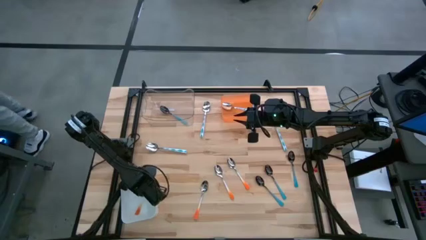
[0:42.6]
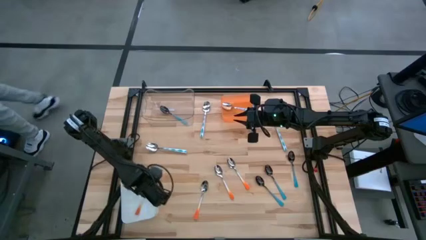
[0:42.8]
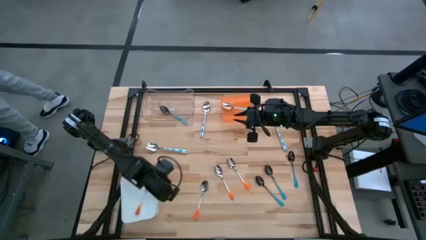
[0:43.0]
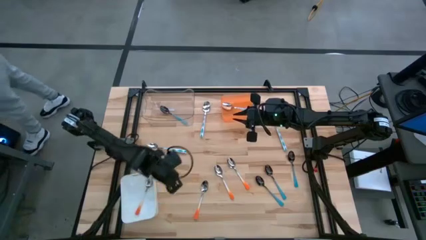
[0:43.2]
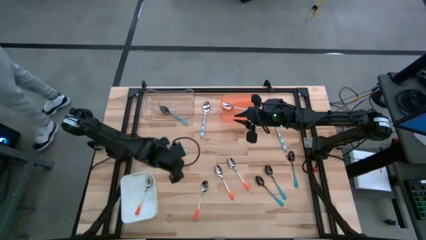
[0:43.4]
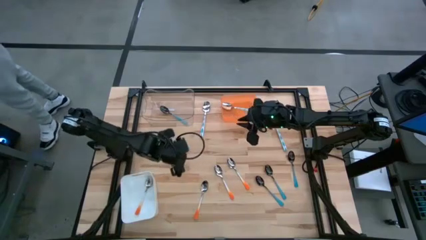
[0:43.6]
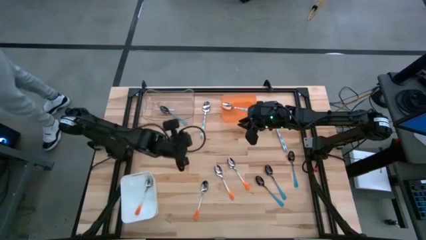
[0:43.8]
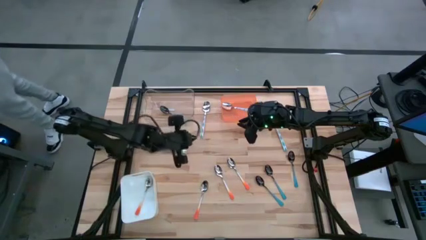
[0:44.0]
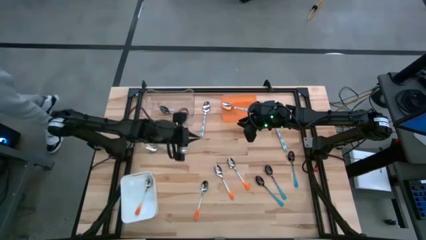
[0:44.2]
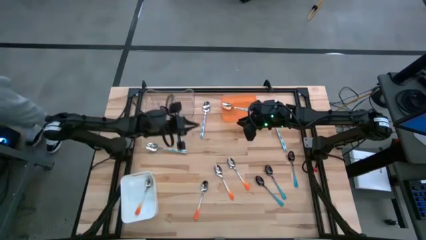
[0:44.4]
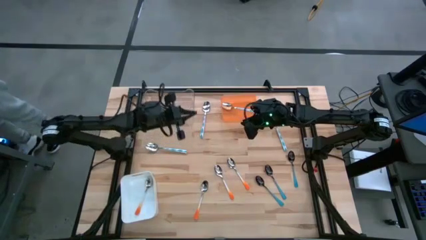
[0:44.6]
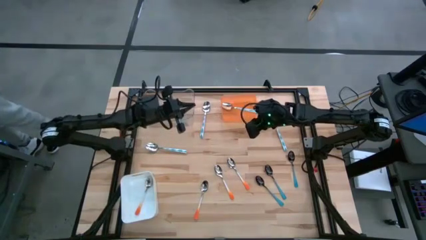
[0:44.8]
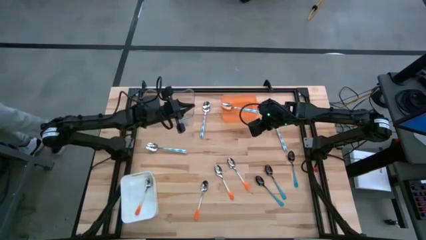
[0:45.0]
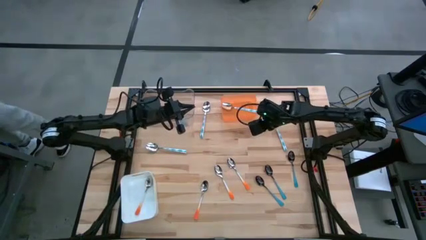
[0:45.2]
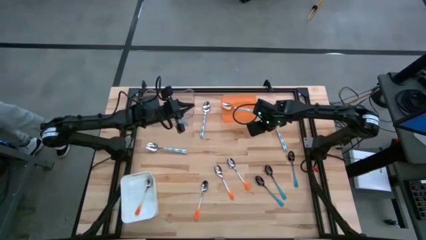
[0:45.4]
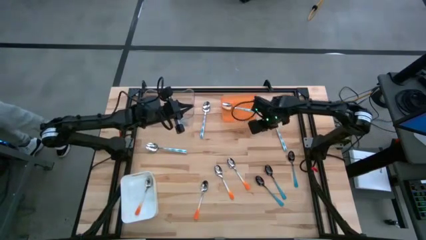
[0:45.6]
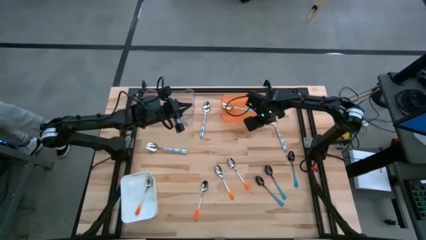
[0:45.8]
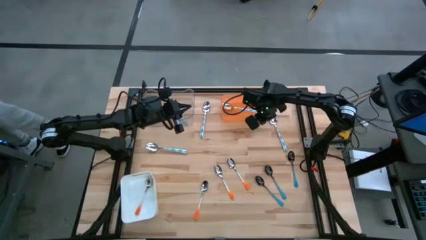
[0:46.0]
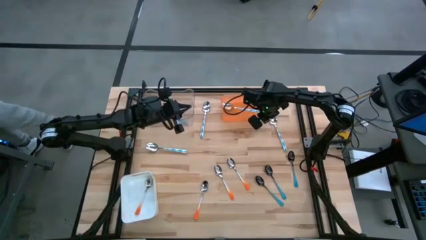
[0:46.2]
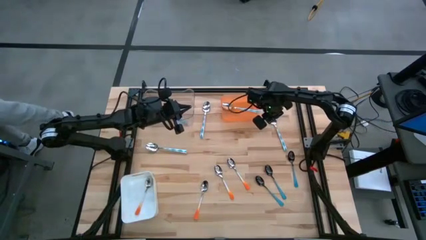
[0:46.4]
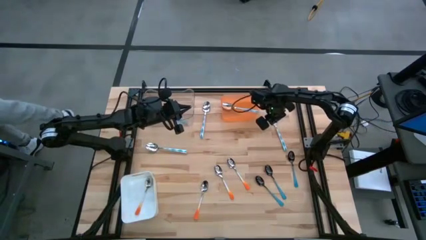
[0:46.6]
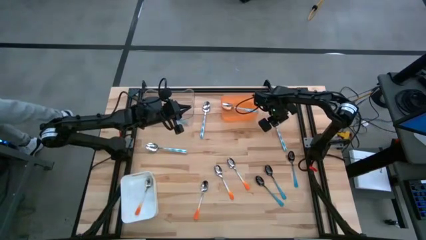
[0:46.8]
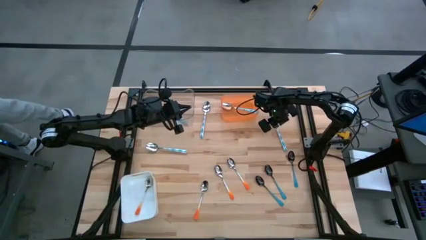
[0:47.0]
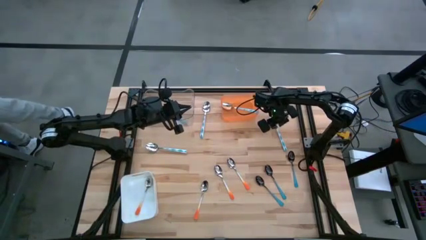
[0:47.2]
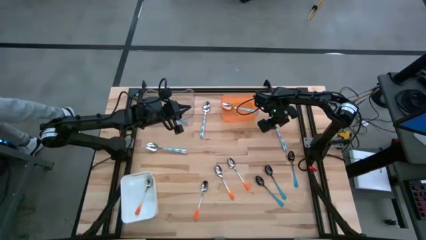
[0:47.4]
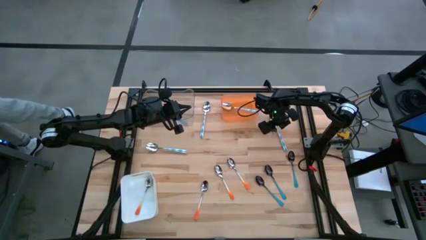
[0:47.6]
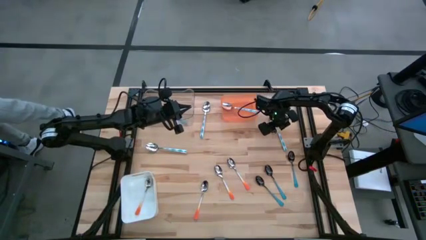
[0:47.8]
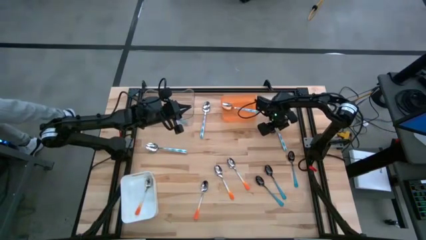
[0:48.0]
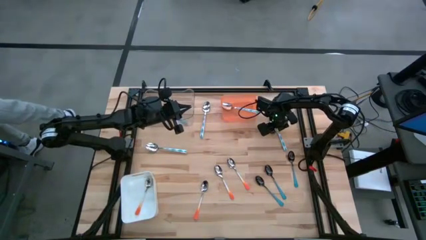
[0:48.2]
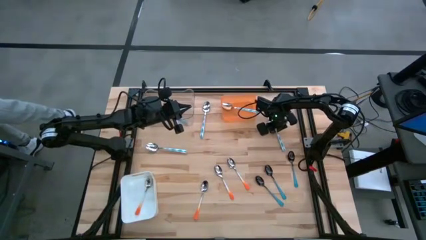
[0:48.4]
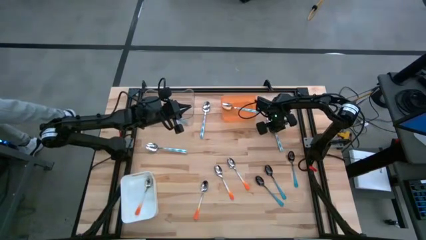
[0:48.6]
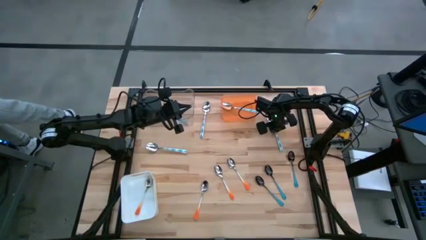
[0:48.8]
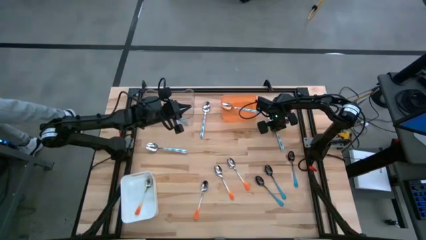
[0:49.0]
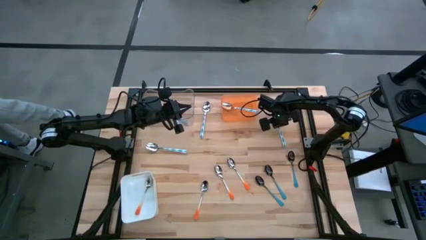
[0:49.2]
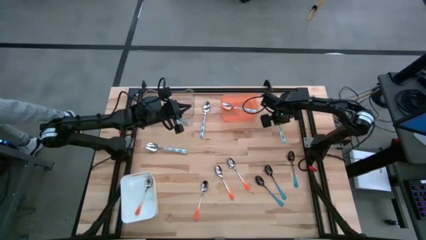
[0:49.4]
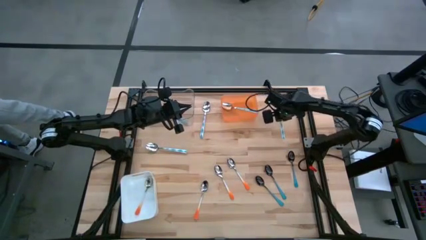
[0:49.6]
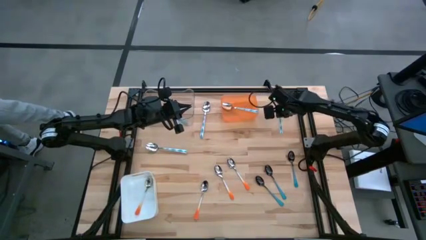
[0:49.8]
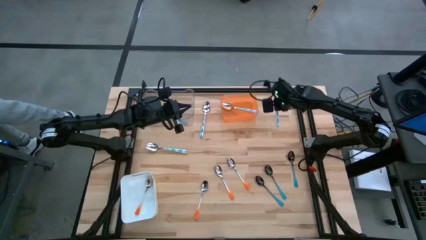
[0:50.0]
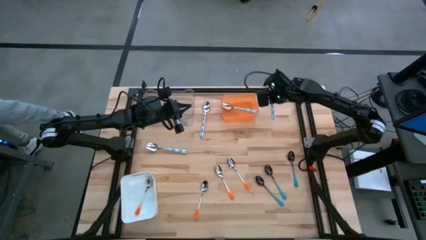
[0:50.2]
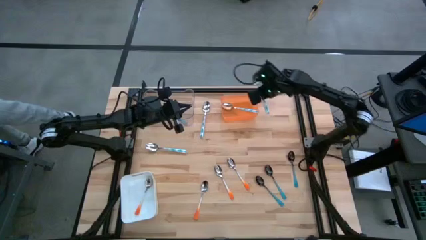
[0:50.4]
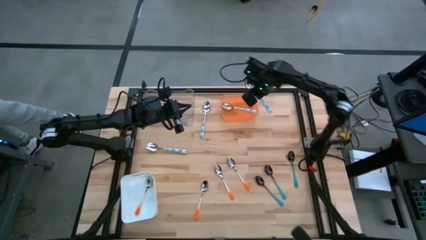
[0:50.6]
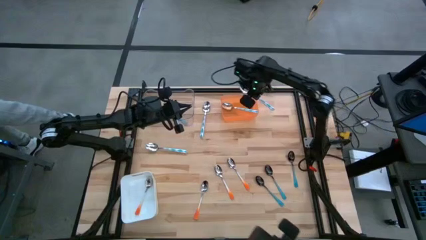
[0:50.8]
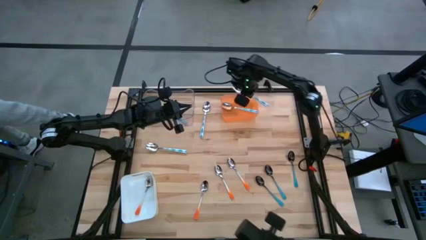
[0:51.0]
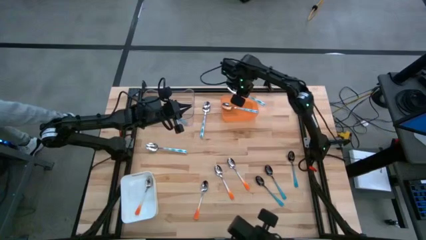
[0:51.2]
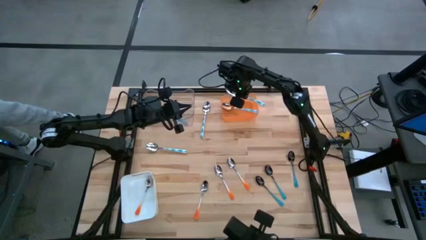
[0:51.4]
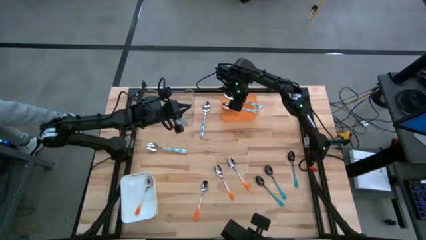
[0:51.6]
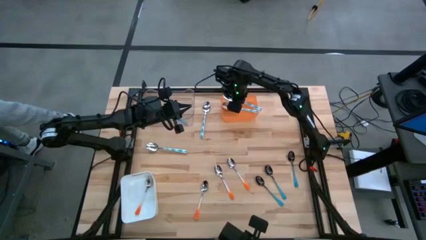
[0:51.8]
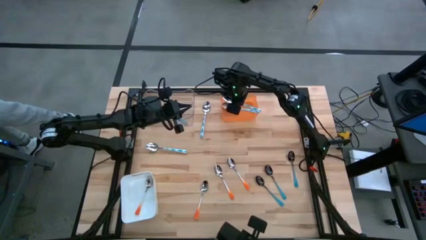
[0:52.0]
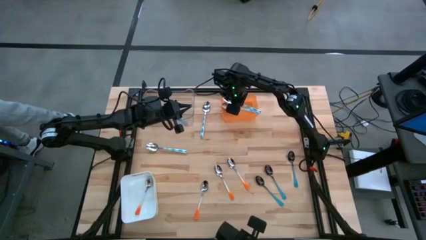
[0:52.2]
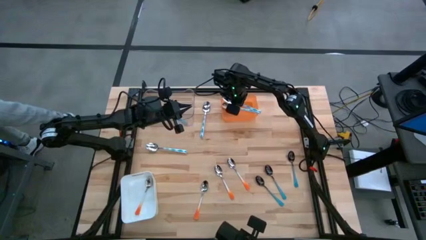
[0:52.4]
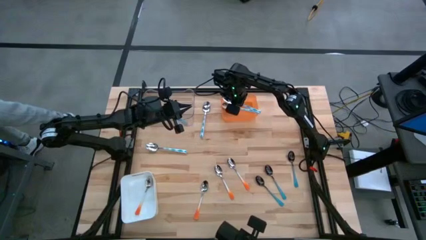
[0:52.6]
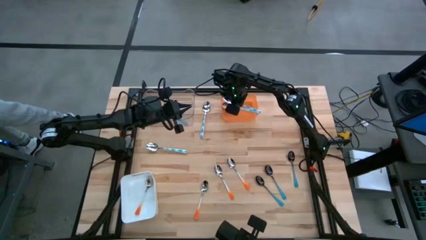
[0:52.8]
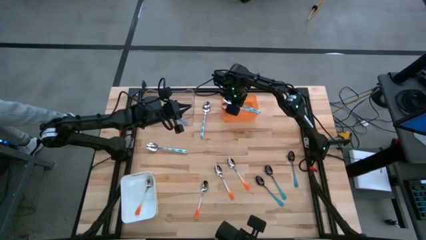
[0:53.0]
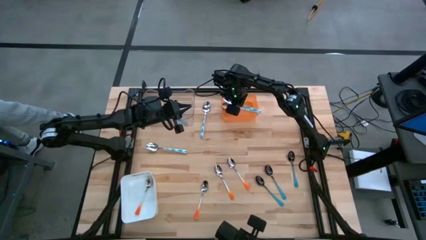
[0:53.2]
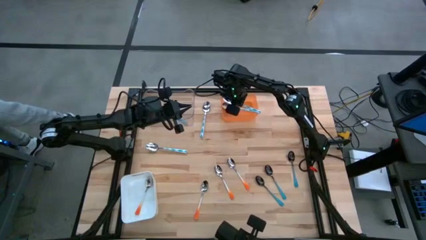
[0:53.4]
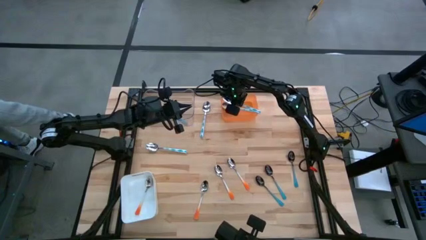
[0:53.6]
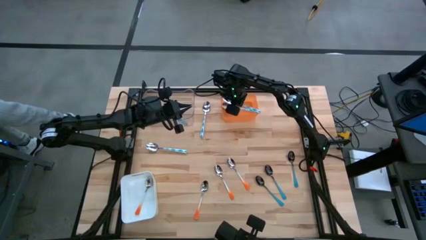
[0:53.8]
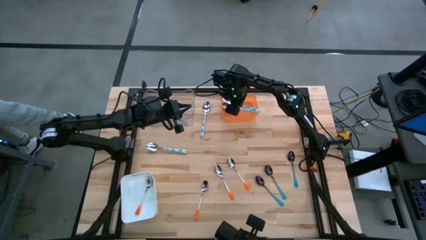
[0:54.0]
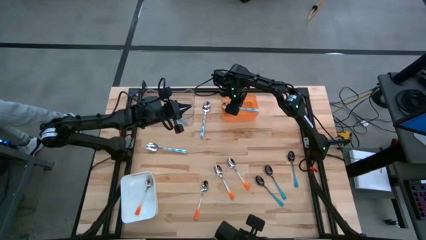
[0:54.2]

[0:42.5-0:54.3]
Task: Sort silverware by color (type)
Put the light blue spoon into the orange bin

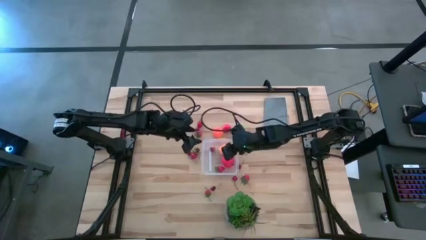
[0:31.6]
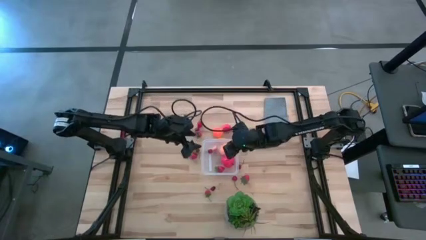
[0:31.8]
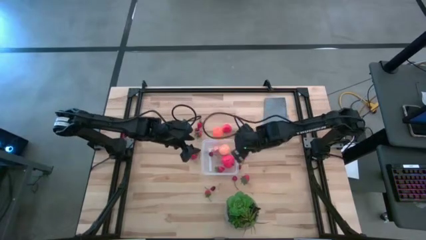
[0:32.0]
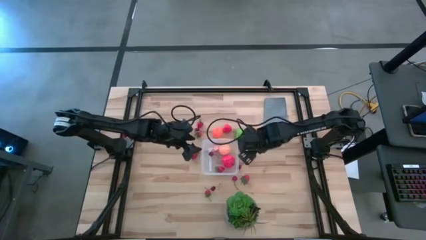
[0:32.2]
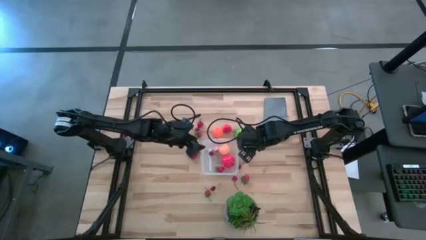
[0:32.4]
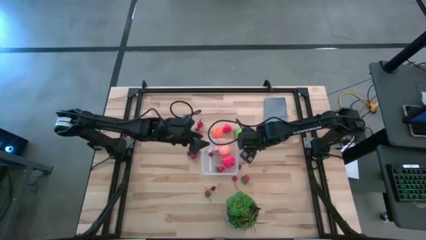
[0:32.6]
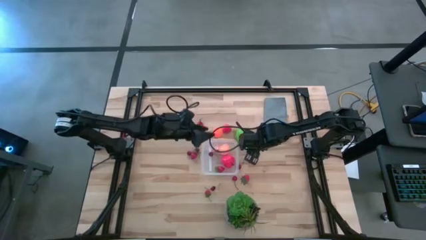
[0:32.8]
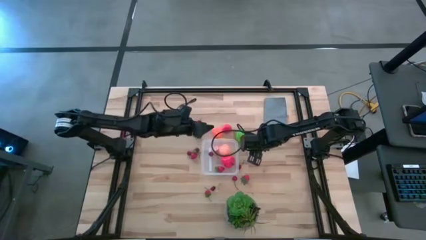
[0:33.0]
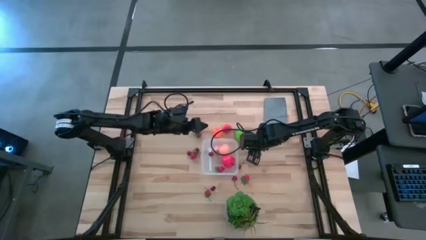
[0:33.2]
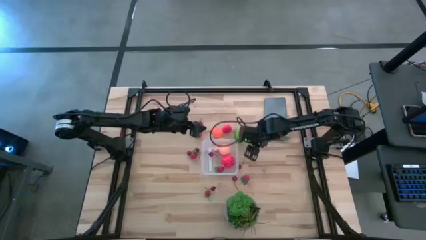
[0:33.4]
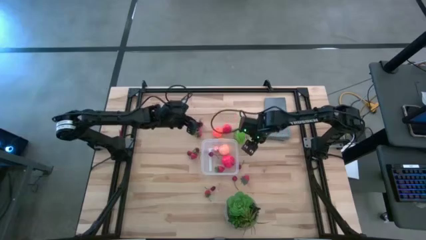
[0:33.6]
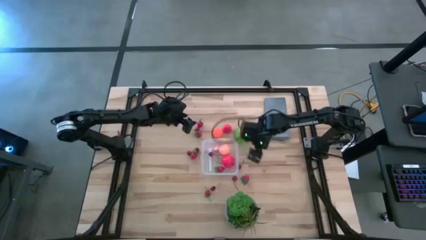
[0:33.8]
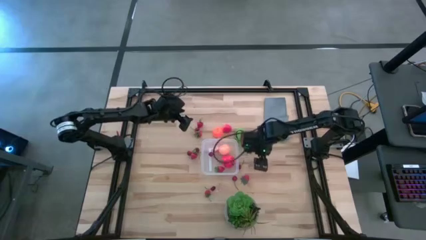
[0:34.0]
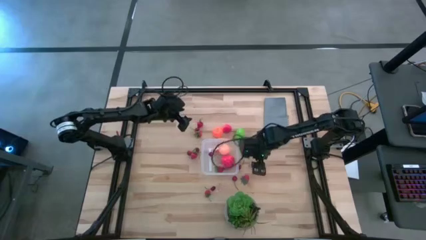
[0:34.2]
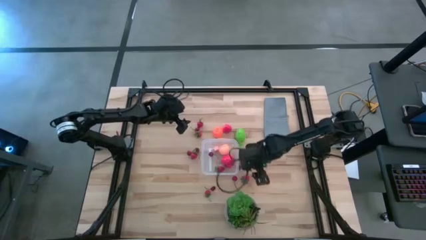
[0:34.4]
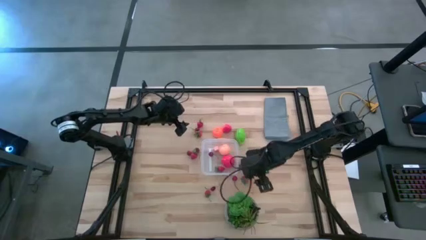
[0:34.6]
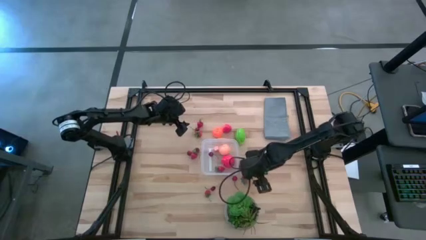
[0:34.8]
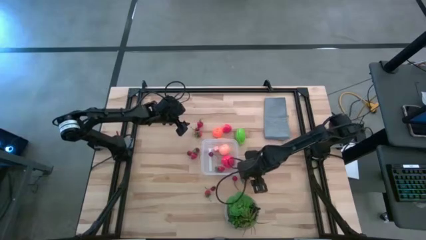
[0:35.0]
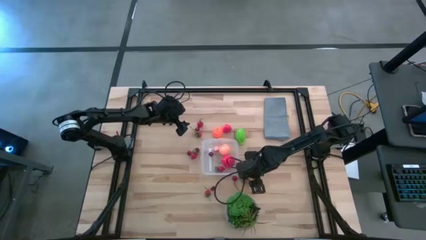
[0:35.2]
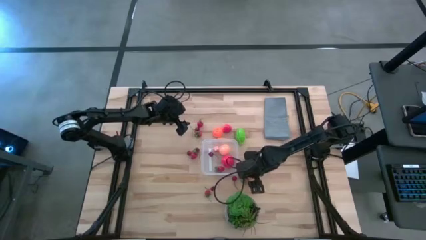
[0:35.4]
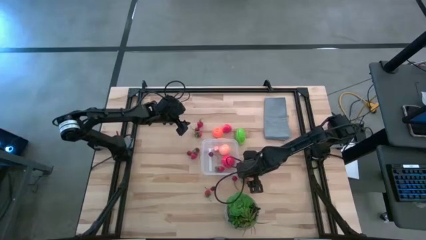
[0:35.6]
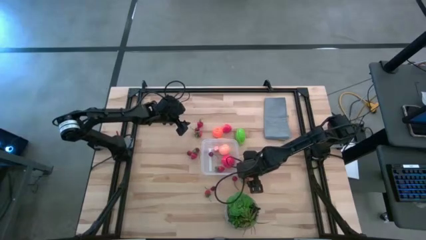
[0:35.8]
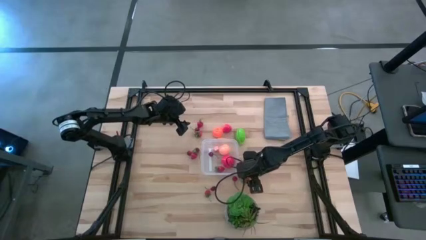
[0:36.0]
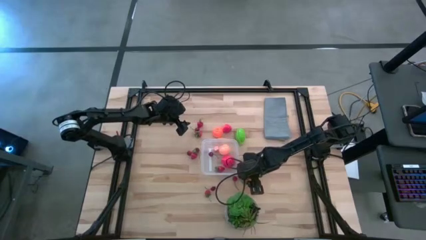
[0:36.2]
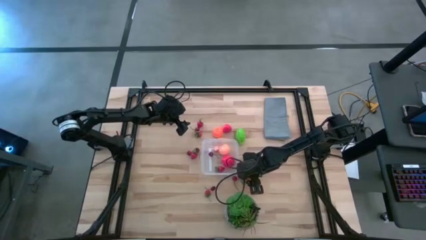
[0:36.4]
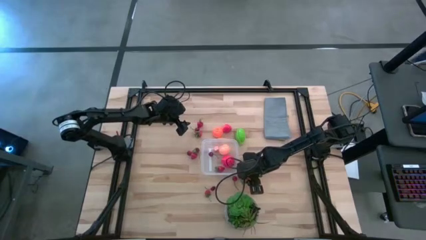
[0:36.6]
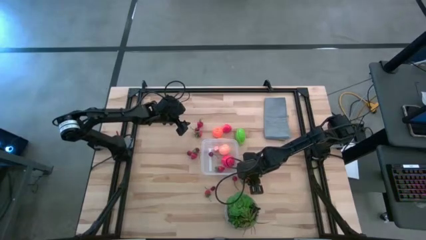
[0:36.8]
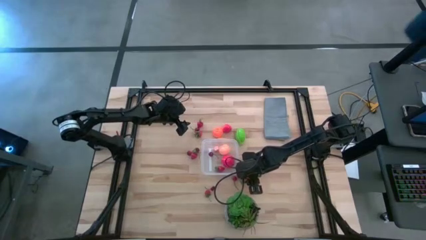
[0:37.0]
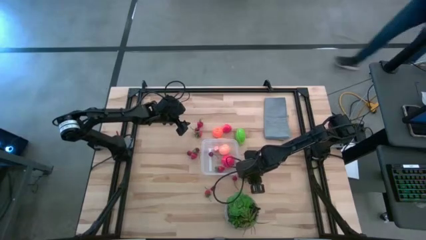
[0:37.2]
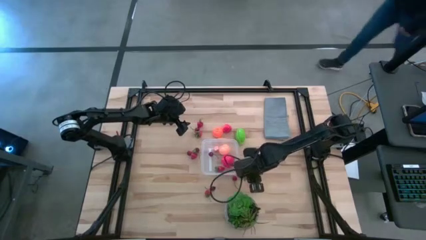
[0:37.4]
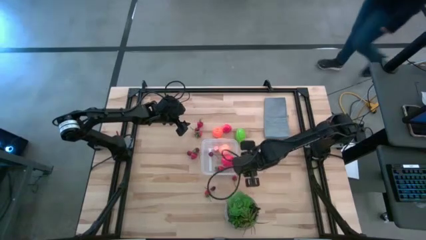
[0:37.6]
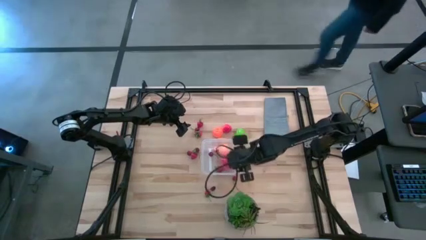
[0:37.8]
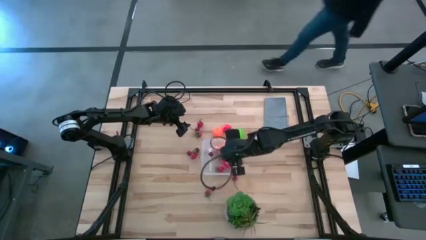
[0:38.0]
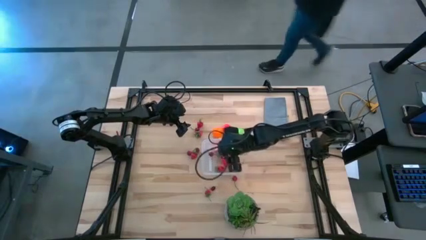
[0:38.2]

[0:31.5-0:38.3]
Task: Pick and placing Produce into tupperware
Put the red strawberry into the transparent container
